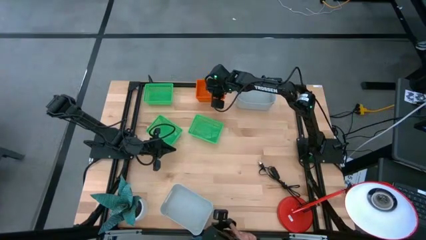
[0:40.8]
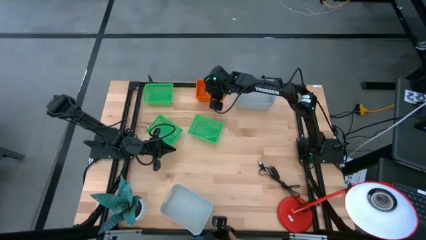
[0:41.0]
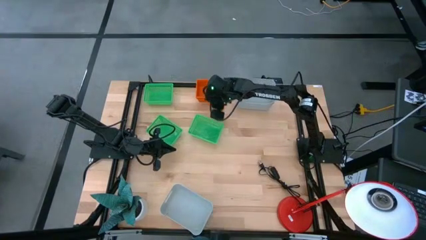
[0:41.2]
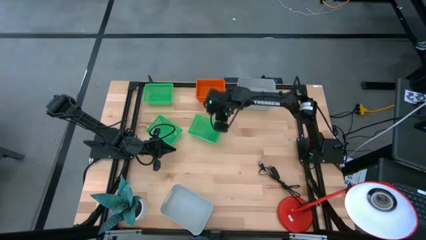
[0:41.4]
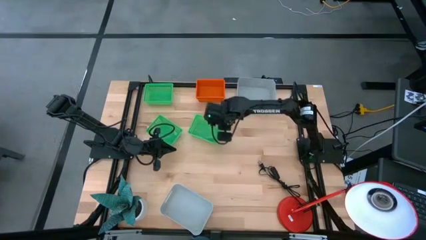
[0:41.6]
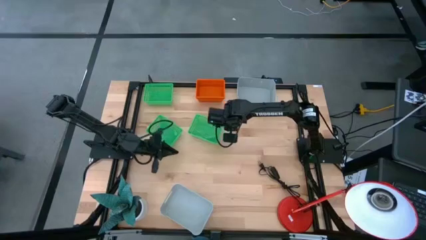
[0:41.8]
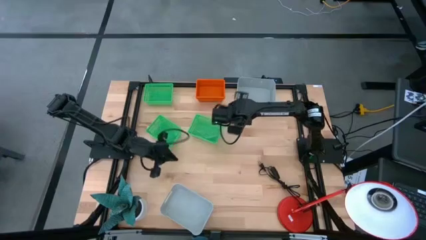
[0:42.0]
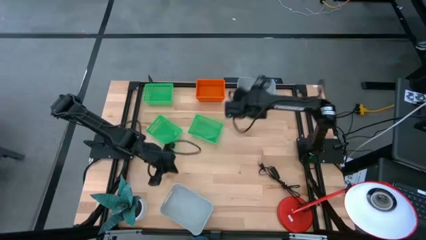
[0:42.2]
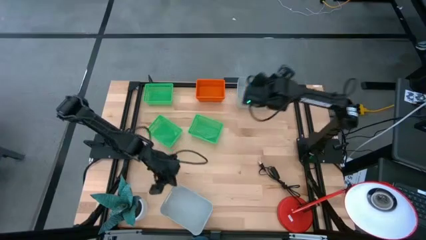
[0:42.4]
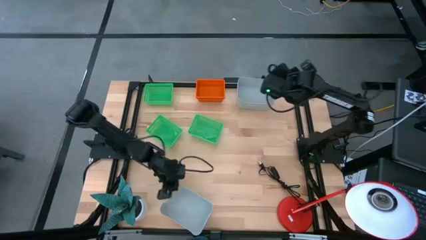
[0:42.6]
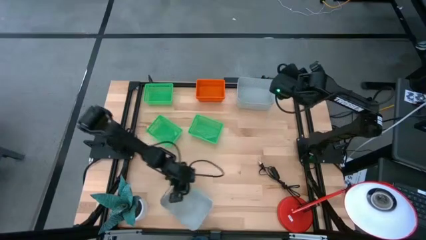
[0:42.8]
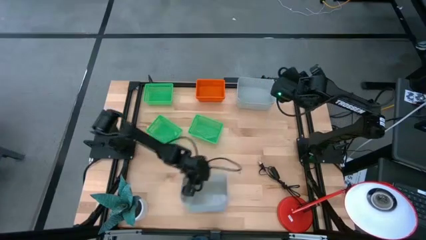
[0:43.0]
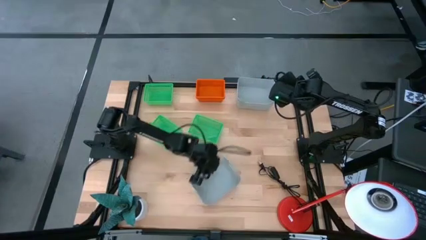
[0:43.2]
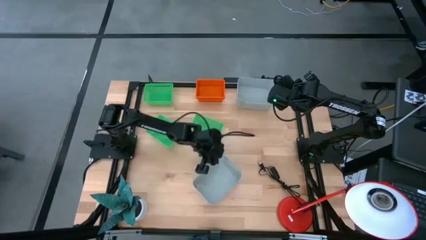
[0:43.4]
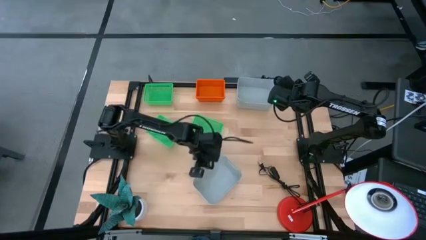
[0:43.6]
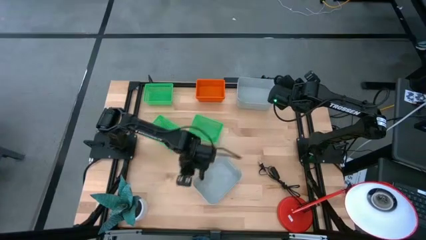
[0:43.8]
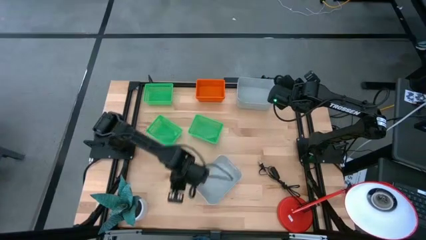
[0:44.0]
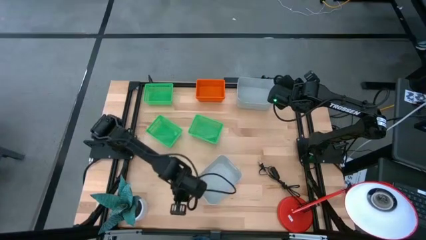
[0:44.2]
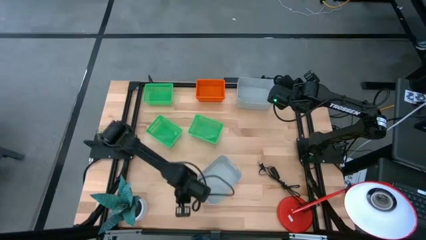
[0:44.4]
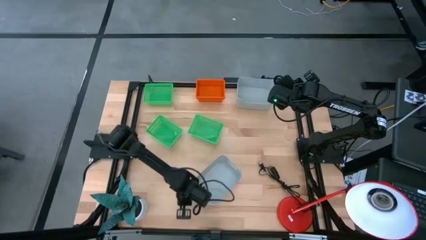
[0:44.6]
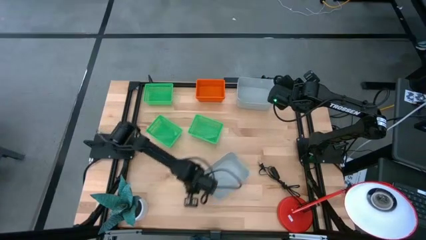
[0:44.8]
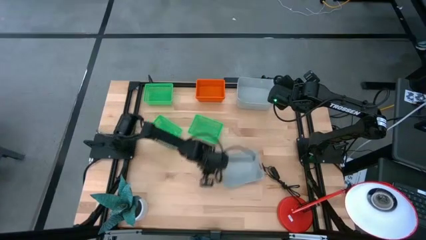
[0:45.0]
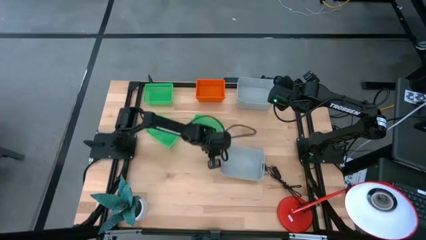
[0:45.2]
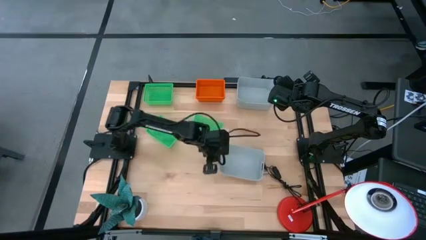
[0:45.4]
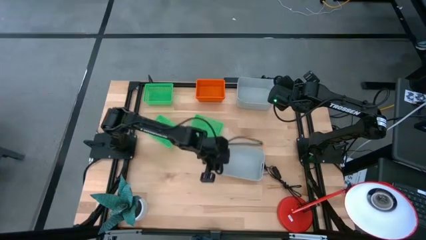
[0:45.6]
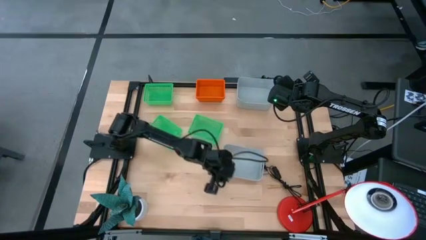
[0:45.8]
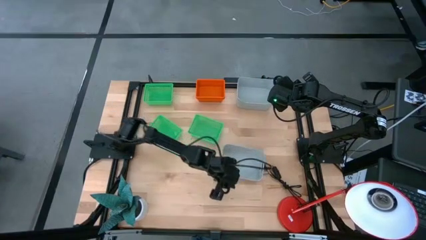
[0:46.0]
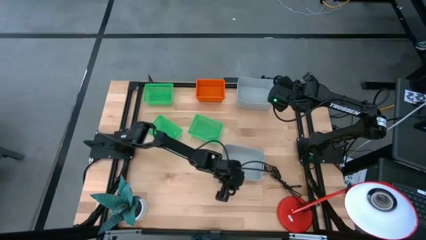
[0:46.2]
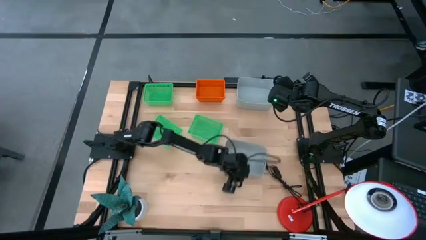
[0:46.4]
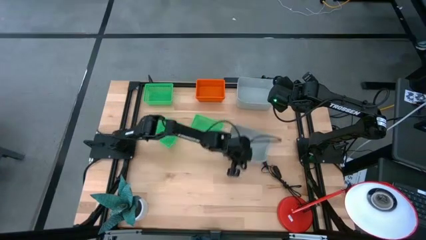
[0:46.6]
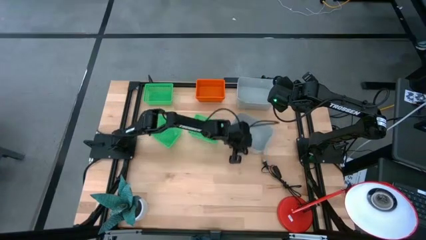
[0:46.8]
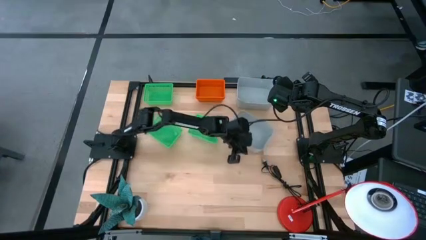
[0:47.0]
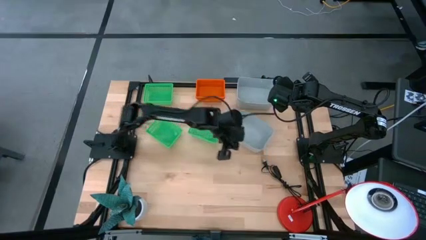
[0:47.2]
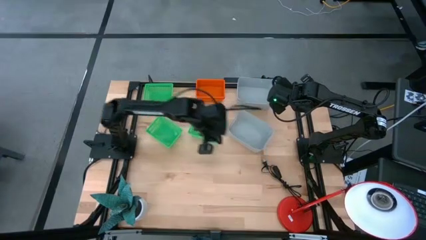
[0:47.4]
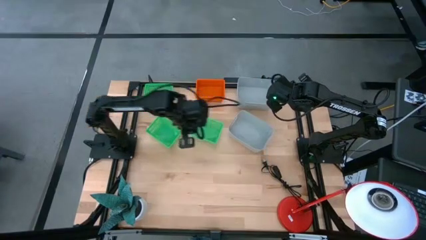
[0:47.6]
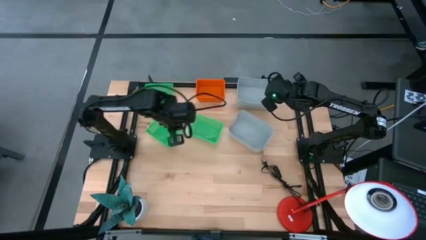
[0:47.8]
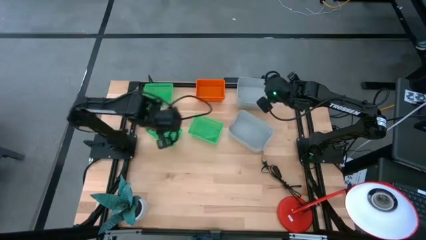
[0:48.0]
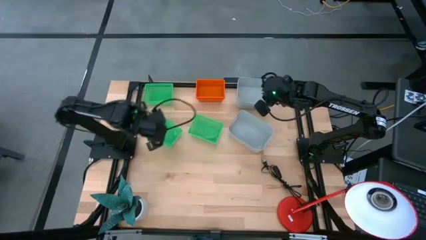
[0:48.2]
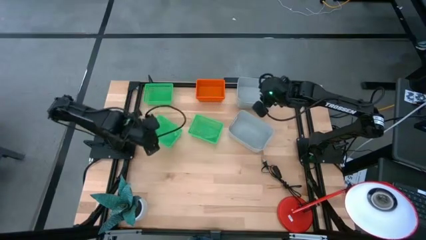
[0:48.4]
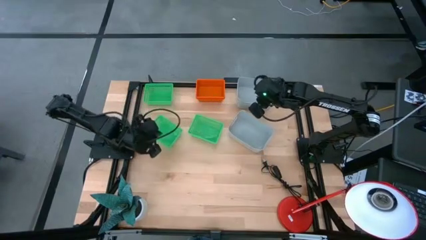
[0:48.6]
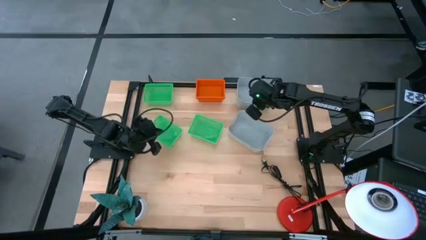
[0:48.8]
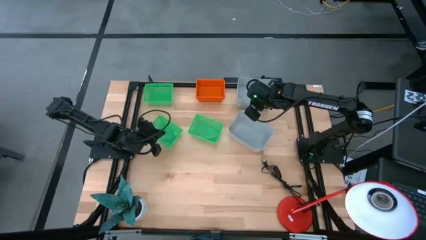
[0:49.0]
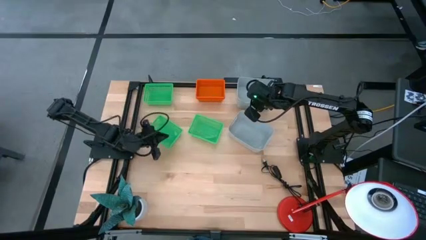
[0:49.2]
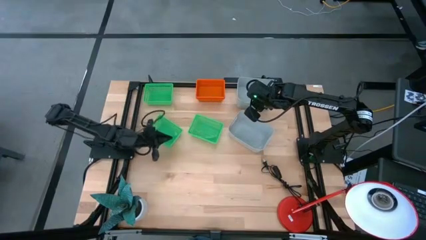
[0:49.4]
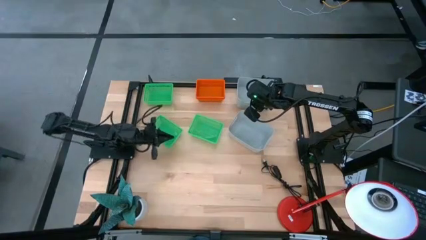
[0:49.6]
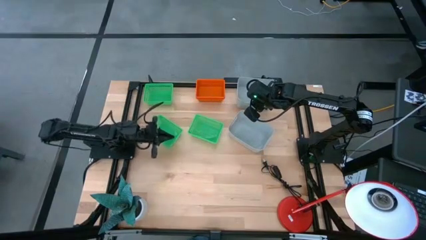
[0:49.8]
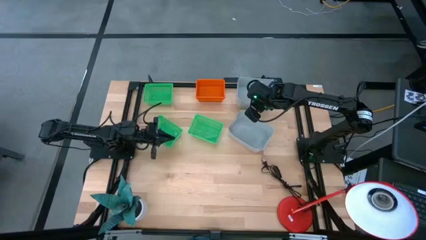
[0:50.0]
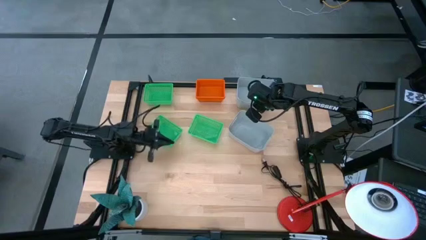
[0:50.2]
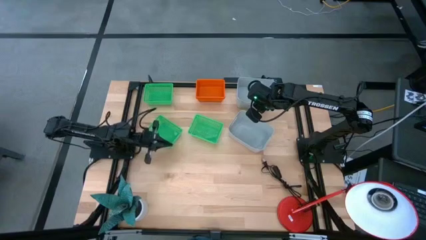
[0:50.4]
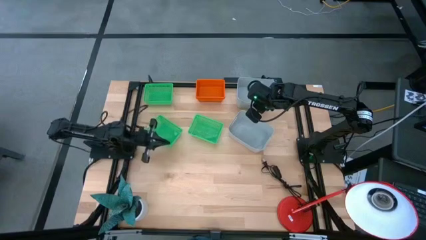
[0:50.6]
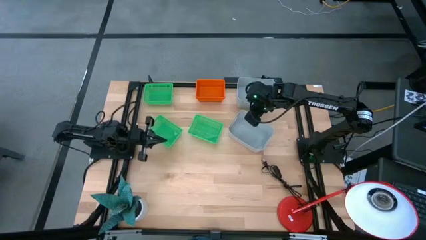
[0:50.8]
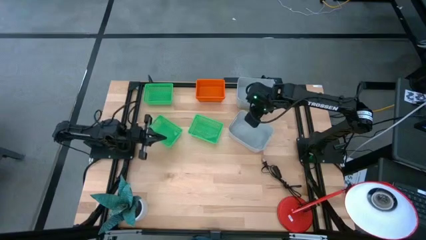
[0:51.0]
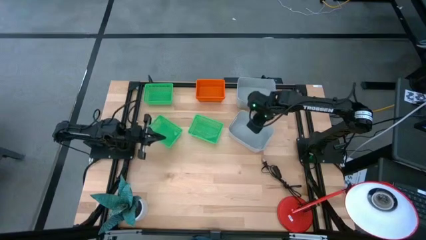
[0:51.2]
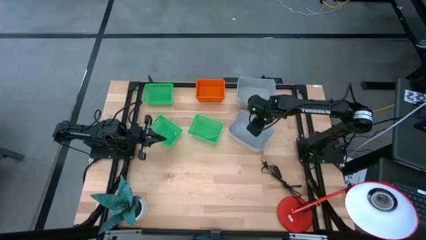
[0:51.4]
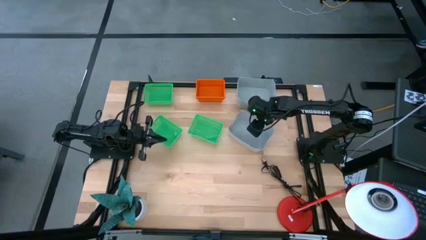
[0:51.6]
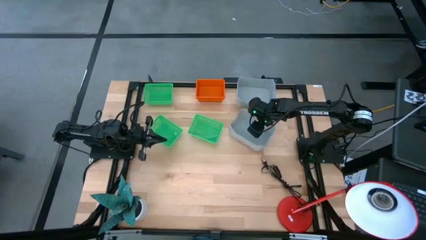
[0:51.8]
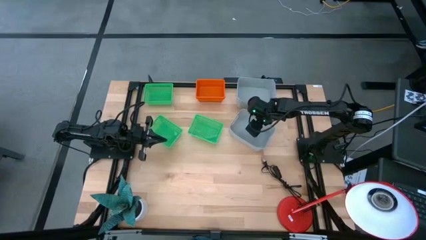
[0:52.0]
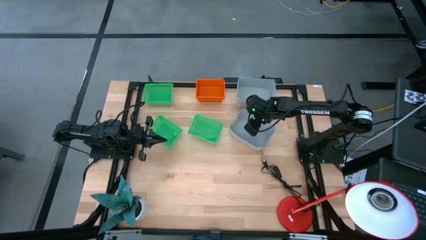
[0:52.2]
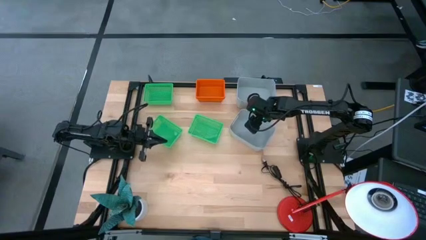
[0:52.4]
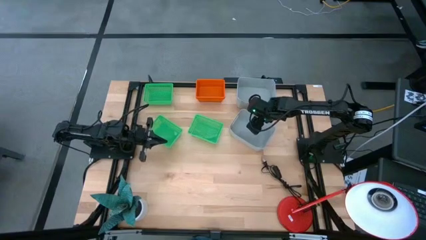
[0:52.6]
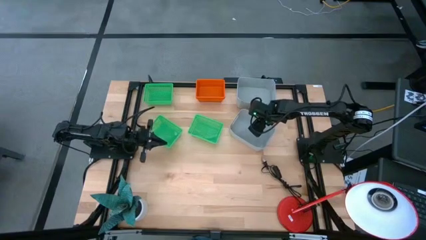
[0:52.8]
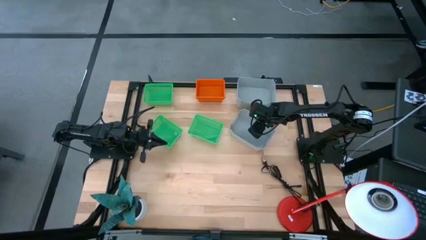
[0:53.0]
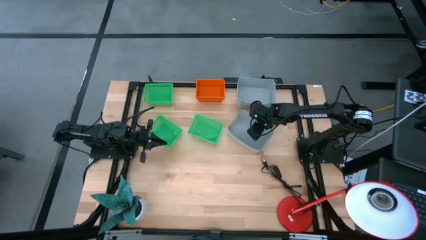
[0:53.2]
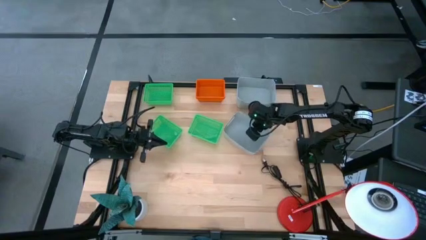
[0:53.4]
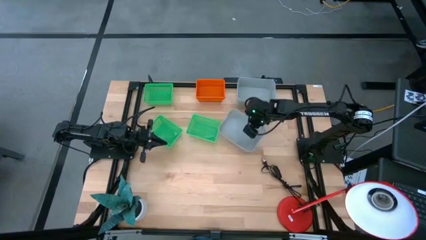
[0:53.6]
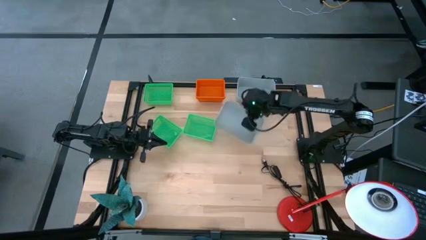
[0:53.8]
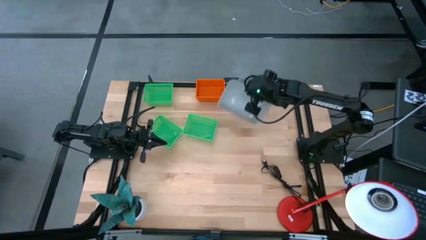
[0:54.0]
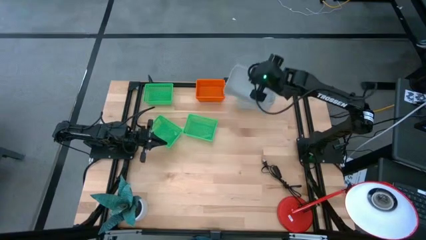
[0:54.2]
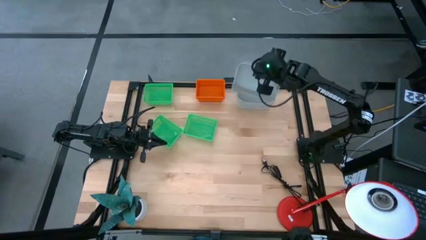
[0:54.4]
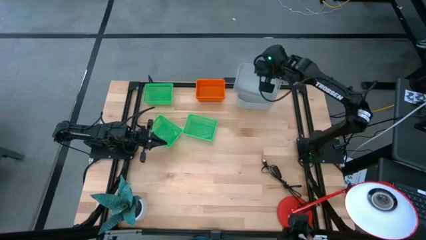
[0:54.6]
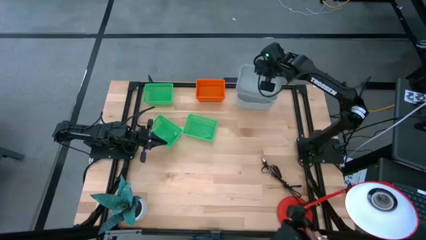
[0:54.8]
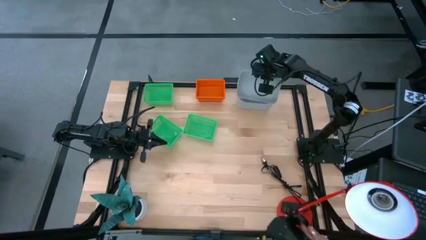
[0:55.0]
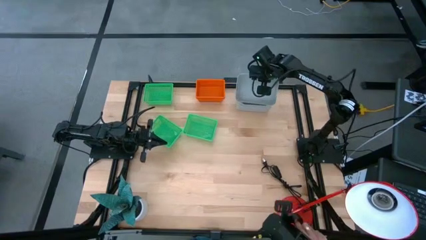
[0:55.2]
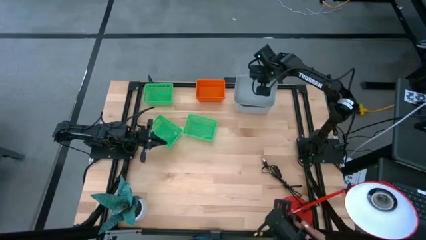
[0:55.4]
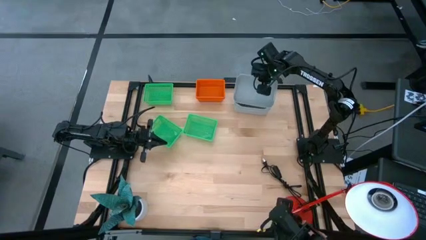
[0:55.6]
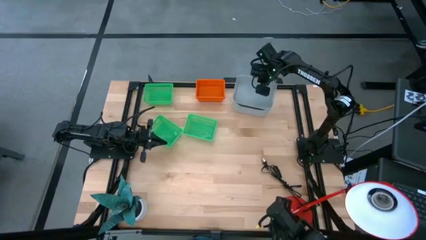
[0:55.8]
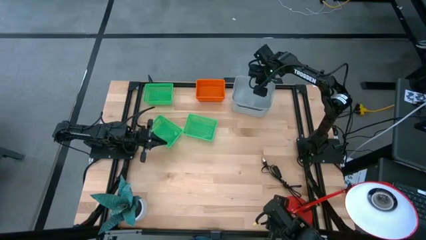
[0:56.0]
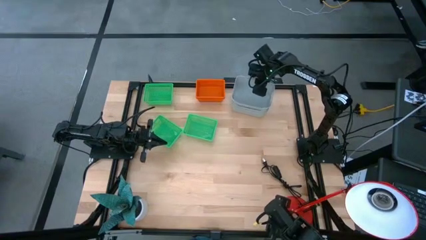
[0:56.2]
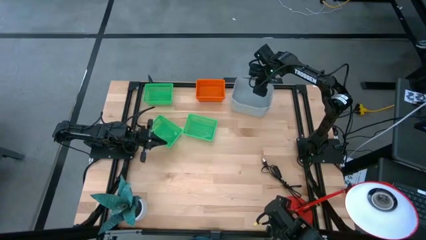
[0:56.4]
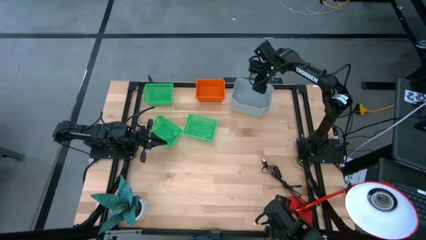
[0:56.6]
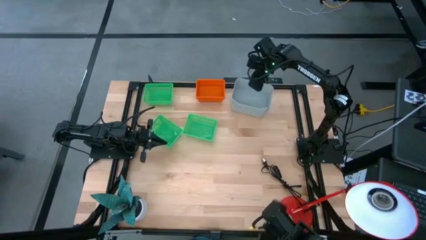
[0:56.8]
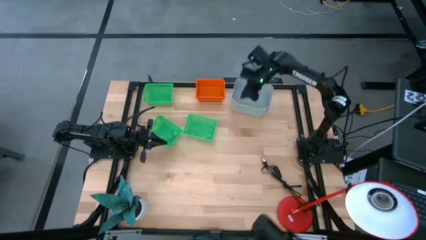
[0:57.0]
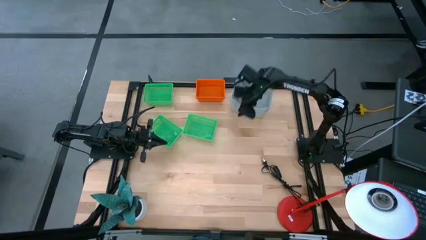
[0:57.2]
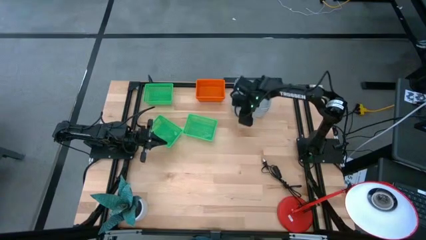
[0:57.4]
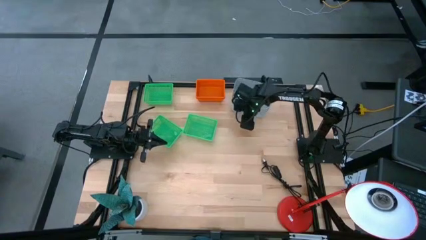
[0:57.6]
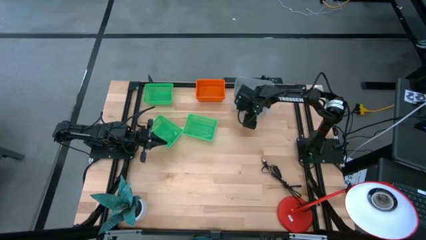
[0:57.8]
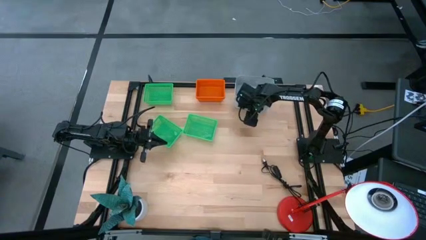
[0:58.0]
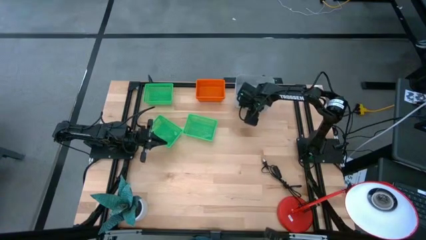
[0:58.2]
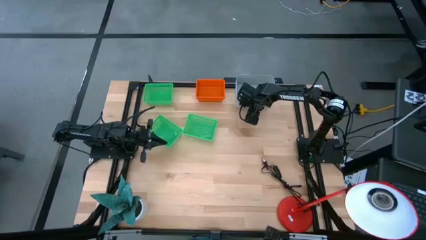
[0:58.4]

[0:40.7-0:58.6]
Stack the bottom gray bin on top of the top gray bin
